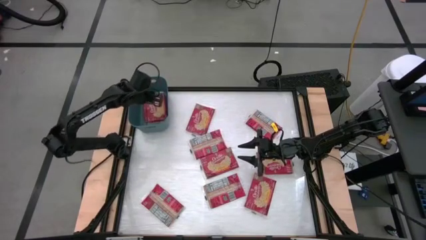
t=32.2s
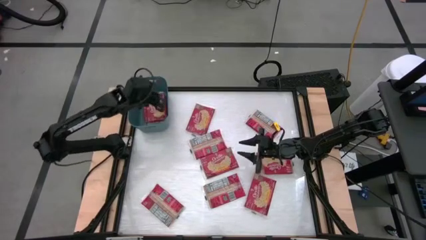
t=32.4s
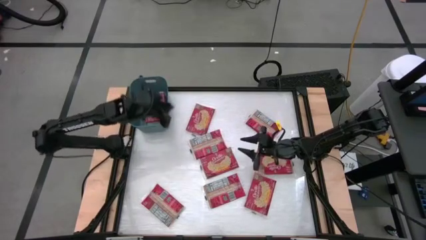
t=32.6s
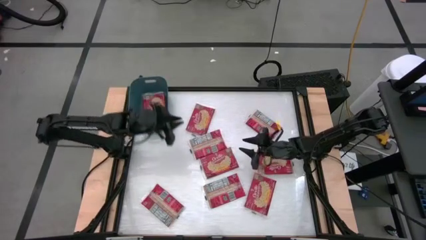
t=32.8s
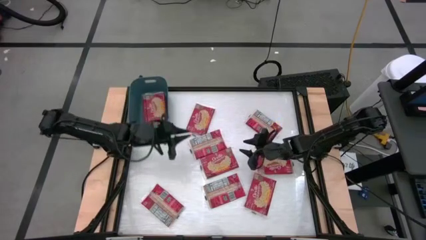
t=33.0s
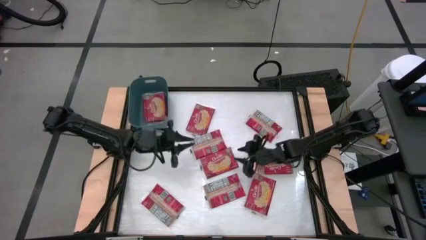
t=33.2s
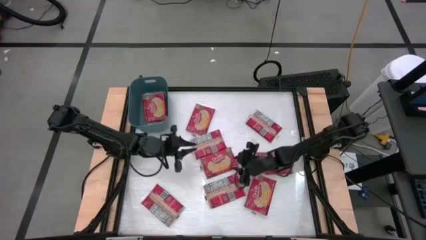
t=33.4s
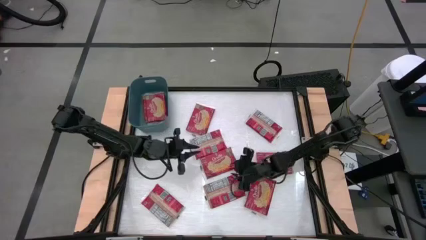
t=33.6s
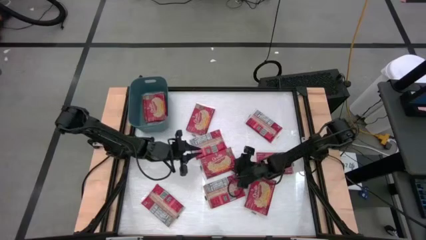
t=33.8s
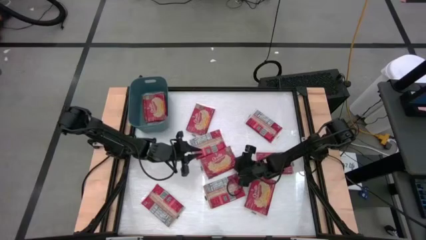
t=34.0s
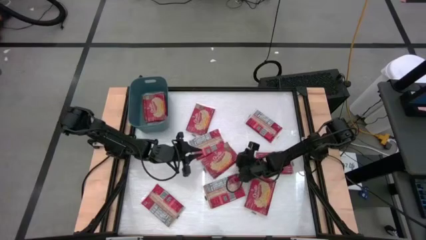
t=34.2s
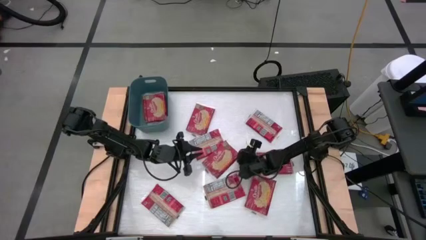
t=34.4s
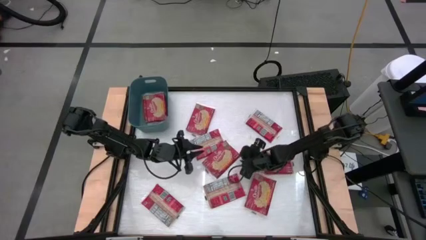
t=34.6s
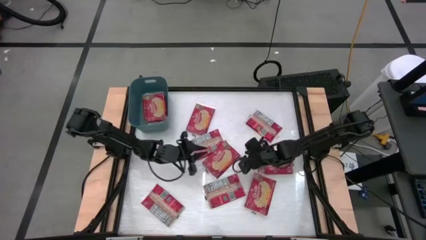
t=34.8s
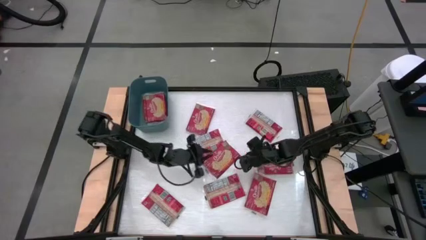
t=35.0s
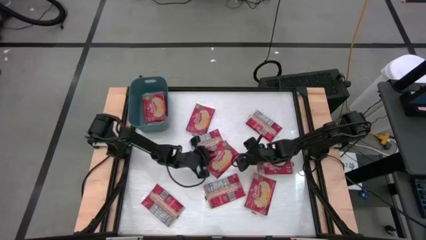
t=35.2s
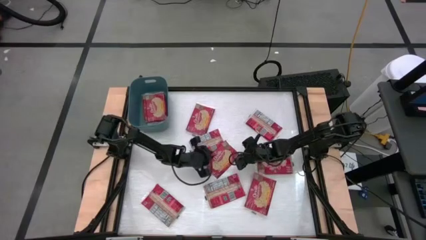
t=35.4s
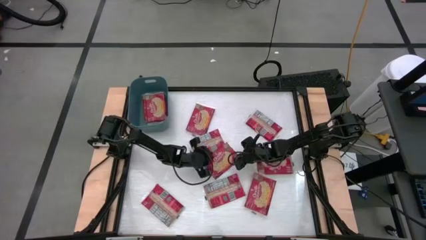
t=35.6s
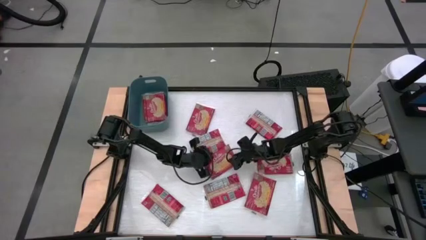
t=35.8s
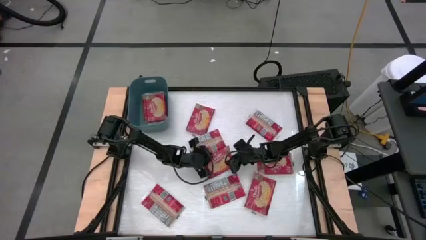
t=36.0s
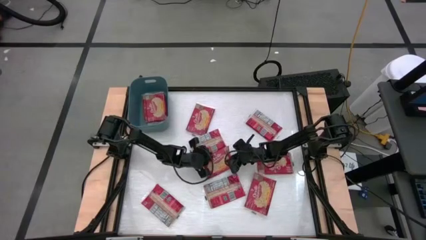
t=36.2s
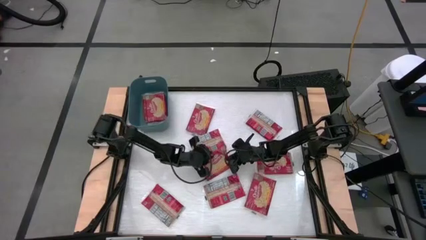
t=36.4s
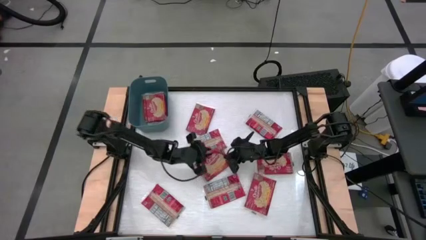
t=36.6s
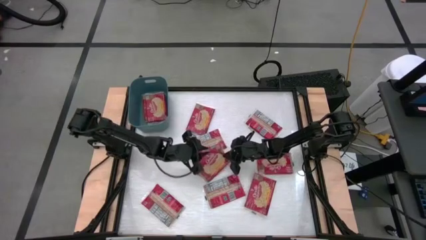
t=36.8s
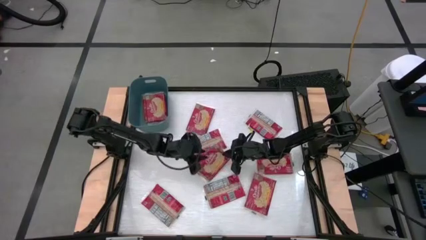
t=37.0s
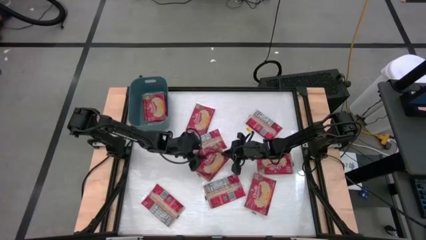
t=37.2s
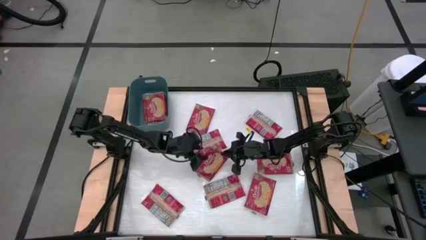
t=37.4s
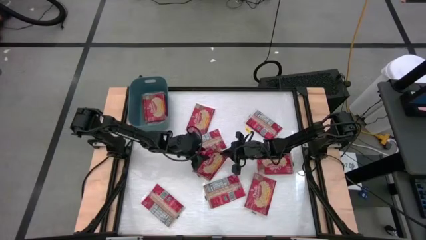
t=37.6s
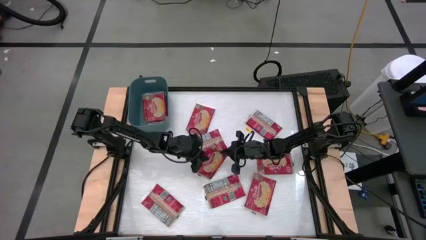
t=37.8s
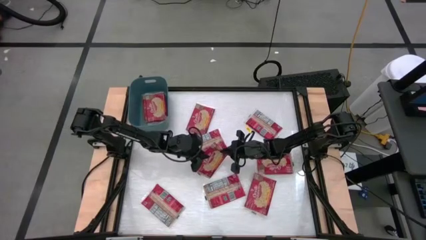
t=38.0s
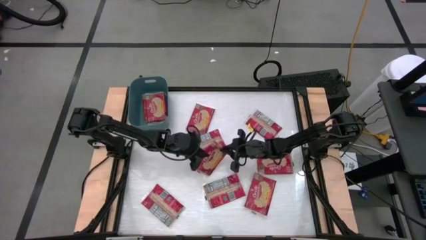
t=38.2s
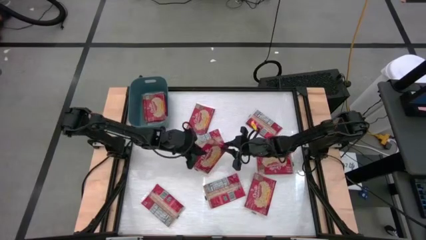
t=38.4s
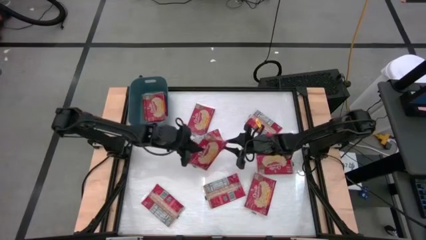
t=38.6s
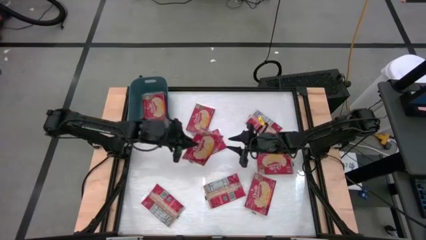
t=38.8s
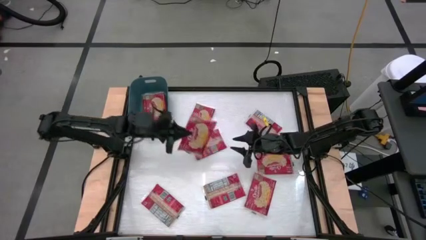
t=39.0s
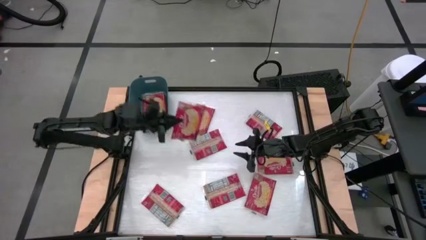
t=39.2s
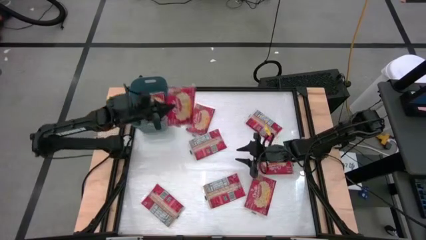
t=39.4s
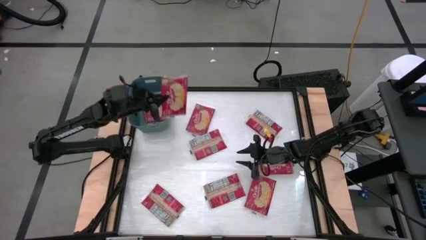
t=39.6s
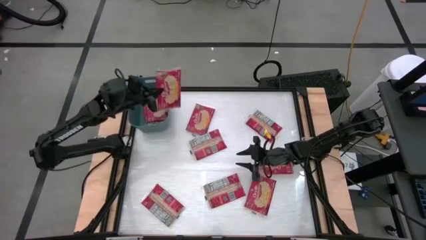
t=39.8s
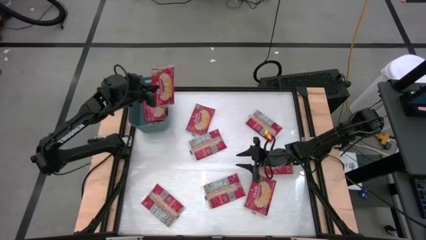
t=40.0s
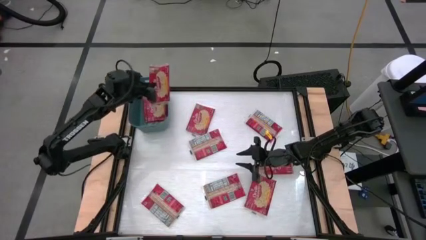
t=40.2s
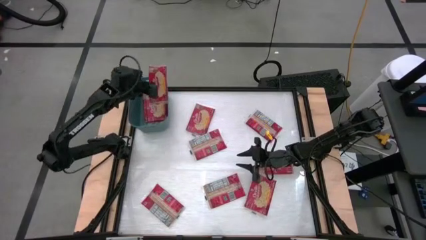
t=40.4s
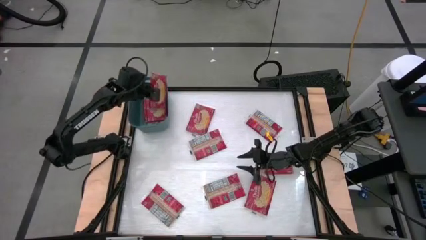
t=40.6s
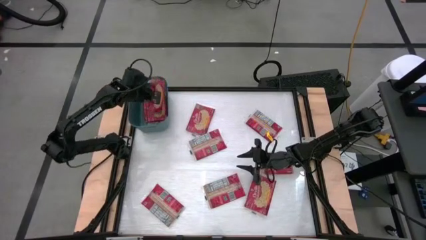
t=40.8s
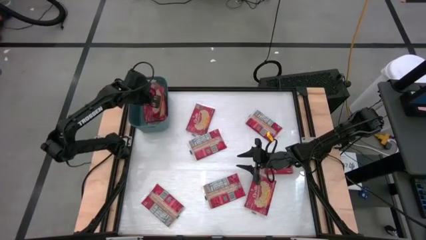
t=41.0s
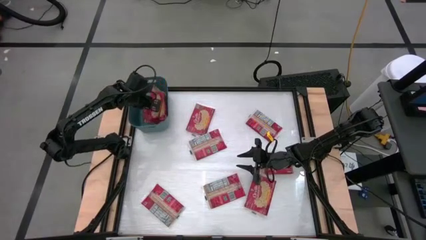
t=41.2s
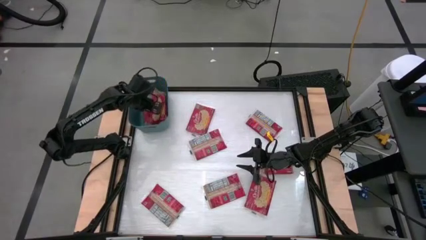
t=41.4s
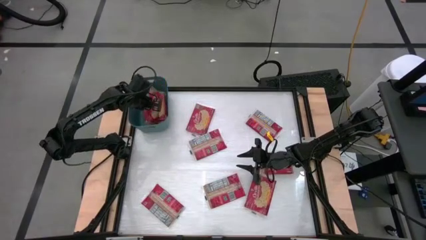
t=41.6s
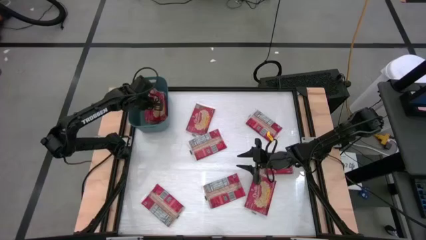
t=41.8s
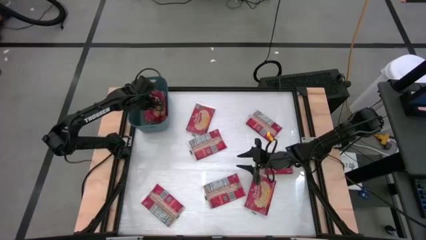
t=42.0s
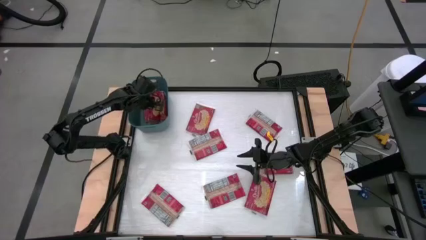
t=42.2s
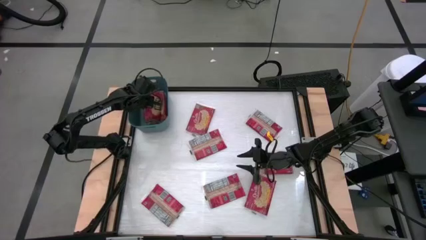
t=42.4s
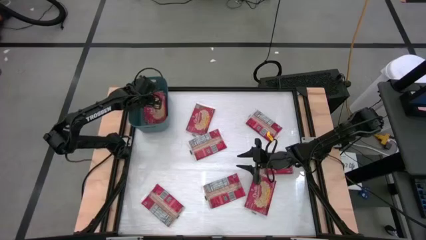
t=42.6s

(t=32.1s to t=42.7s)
Task: Sort popcorn bags into baskets
Stack the red popcorn bag on top of the other red popcorn bag into the blue bin

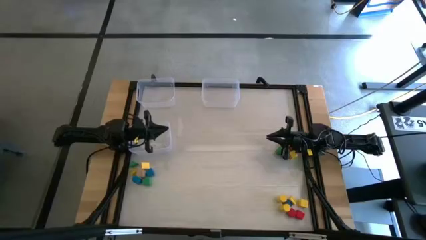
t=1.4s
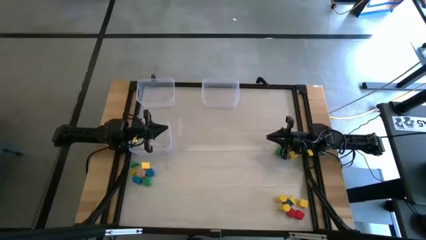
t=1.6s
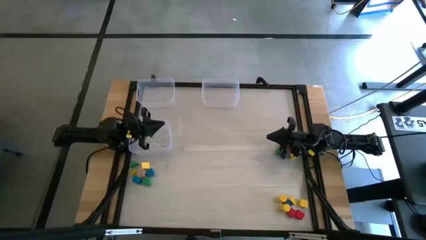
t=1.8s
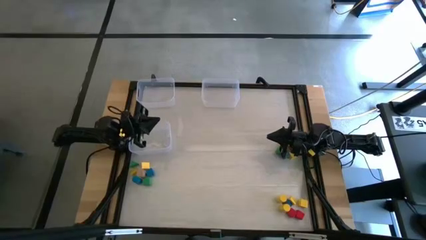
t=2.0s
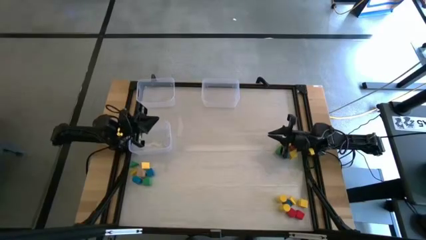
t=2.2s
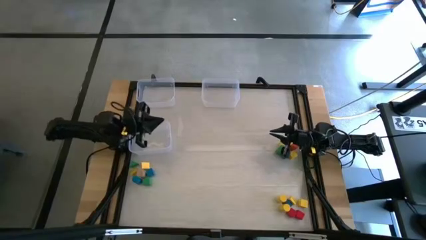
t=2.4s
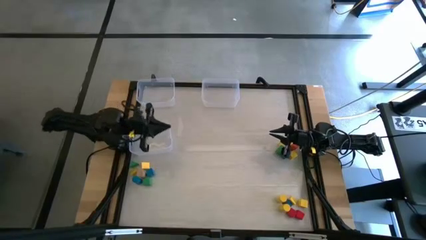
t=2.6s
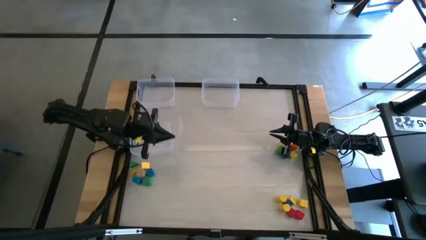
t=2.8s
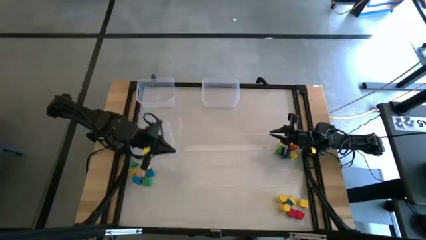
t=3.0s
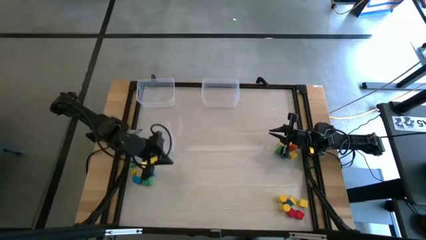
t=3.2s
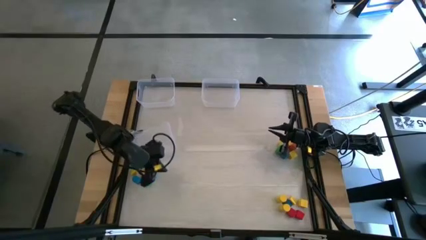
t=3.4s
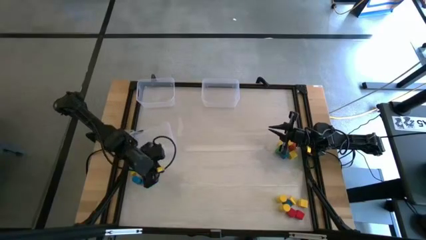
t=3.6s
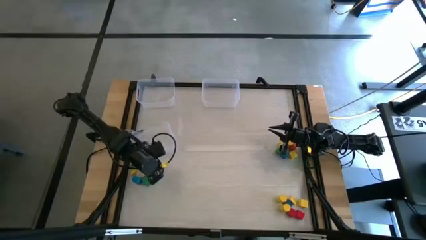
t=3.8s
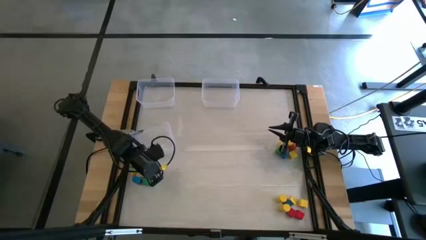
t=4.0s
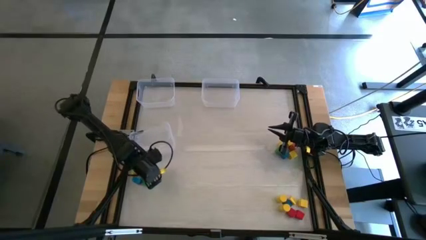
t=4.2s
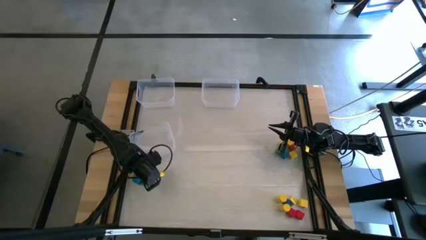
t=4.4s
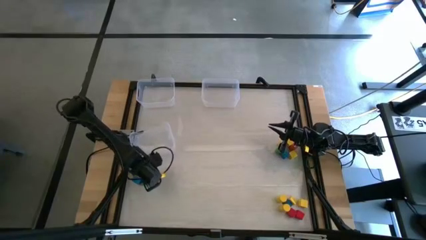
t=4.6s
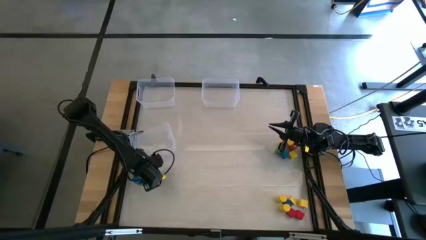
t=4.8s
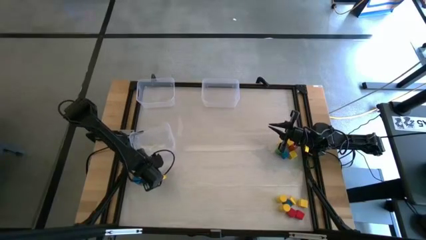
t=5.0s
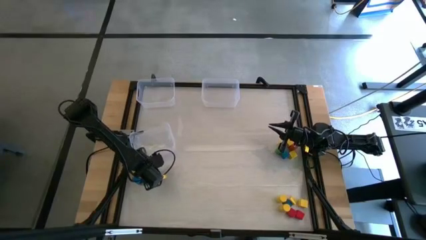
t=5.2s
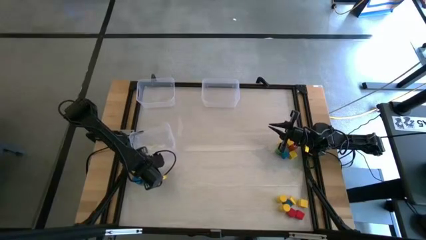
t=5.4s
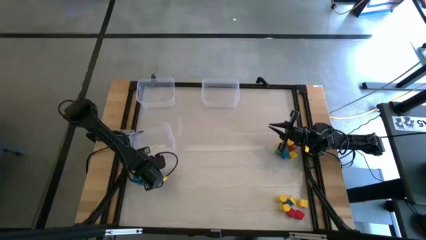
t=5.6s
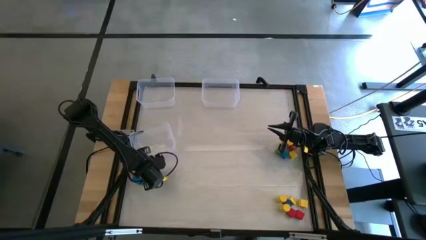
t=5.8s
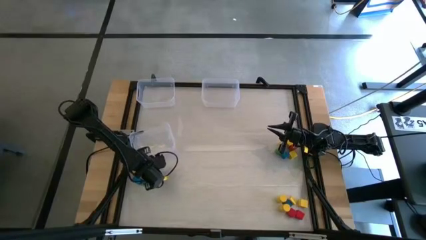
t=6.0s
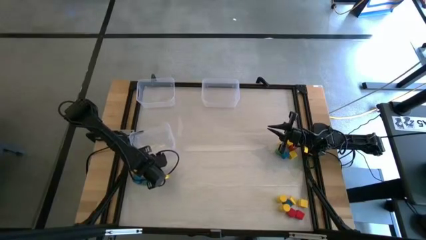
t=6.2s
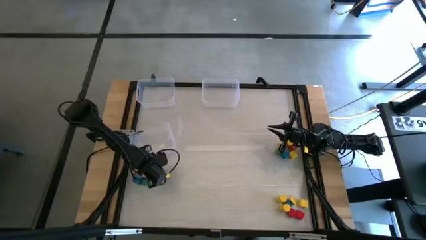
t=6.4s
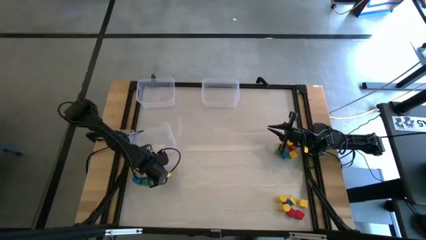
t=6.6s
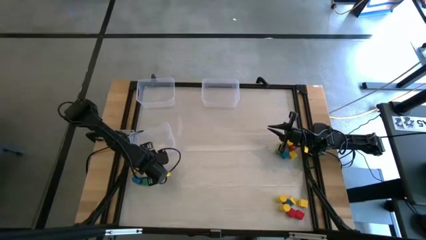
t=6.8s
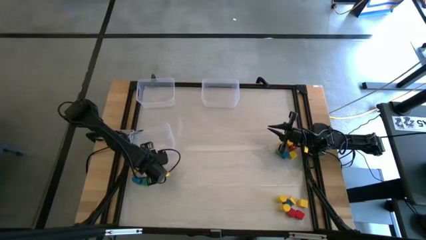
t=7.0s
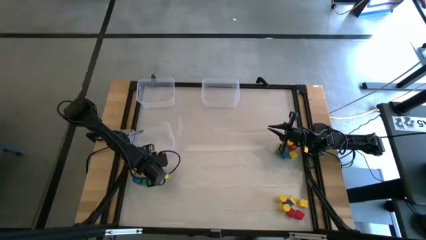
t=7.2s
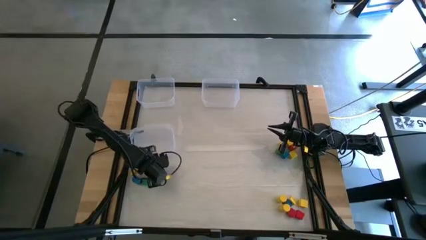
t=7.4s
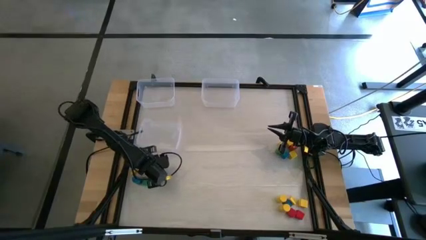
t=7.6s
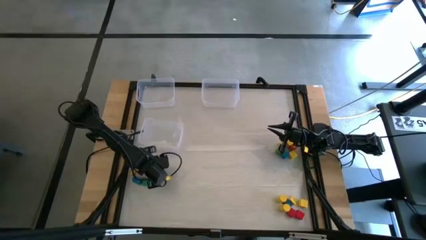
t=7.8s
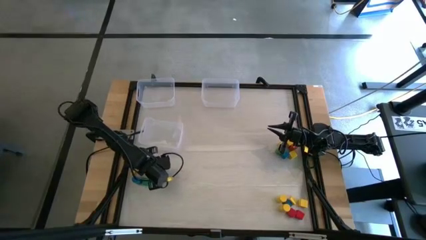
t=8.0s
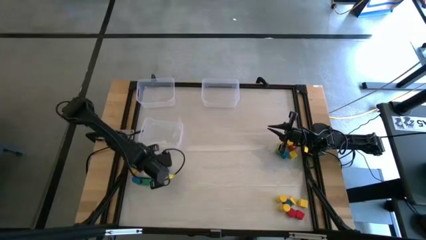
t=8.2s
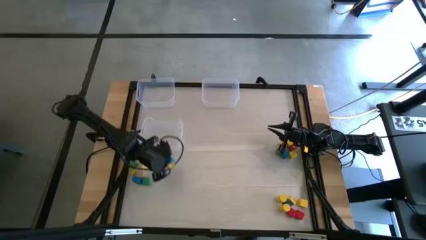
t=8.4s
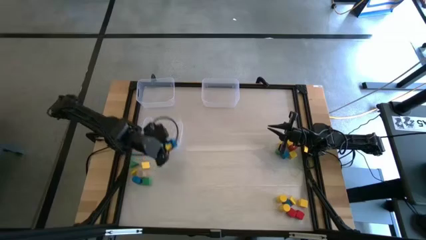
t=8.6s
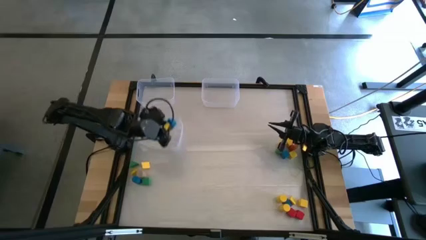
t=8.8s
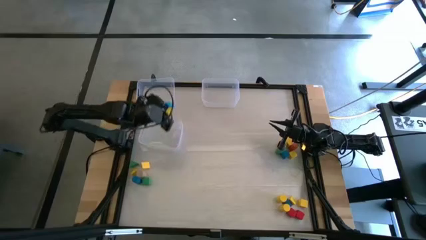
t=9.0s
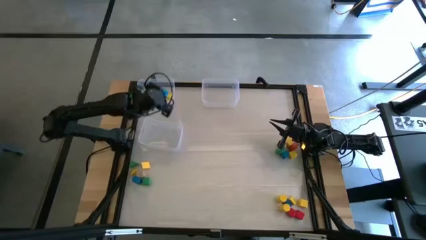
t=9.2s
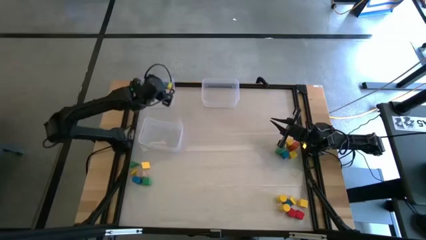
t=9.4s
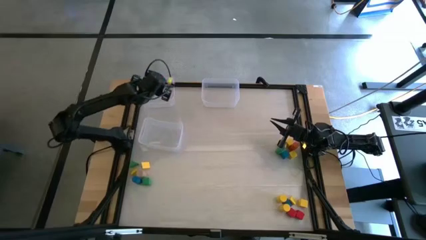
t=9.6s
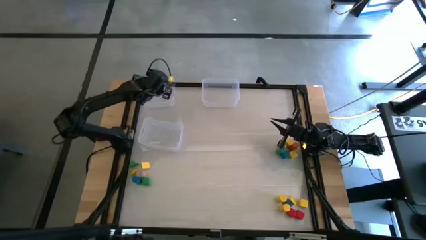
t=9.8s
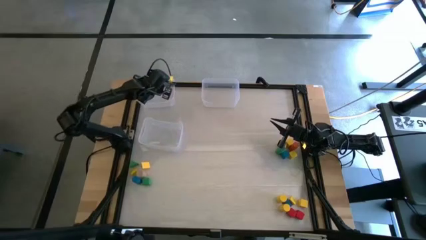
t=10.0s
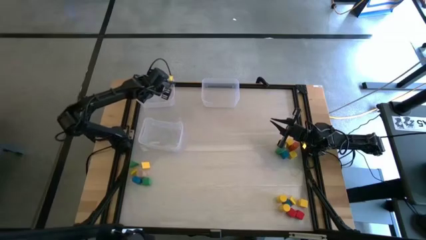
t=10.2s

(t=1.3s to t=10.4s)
Task: Sort blocks by size
Put the blue square game block into the top left transparent bin
